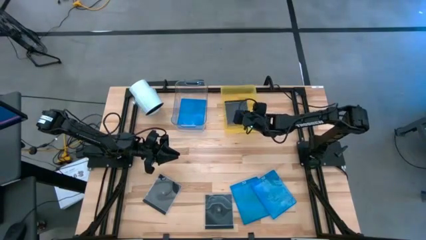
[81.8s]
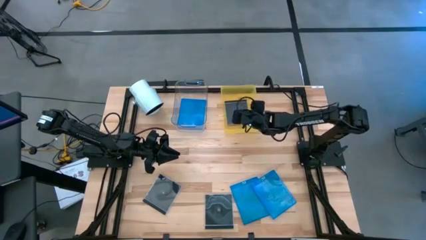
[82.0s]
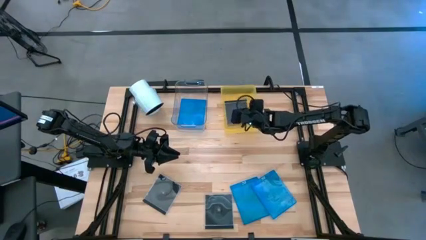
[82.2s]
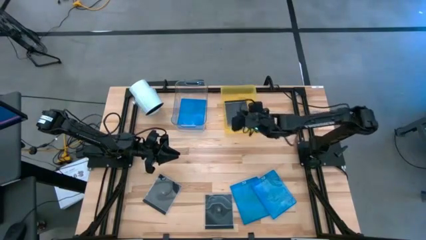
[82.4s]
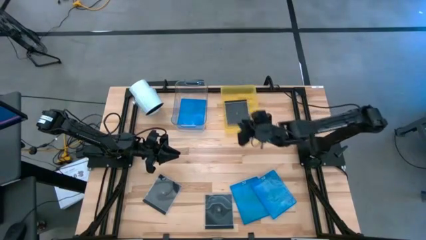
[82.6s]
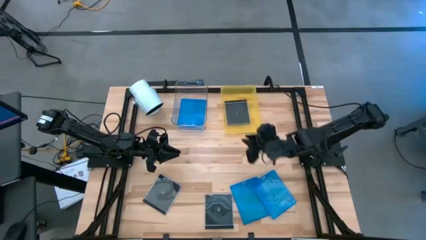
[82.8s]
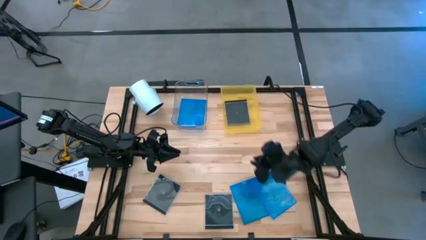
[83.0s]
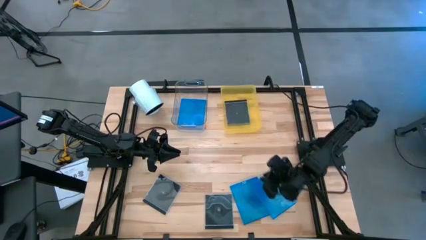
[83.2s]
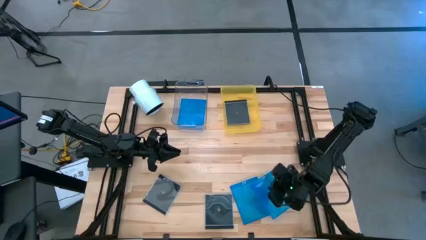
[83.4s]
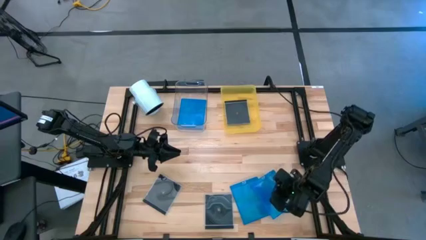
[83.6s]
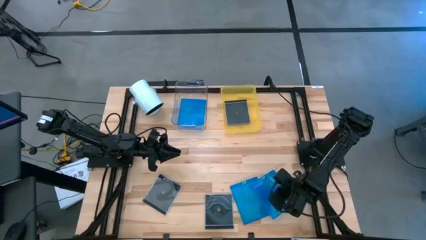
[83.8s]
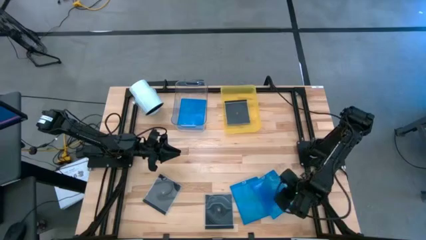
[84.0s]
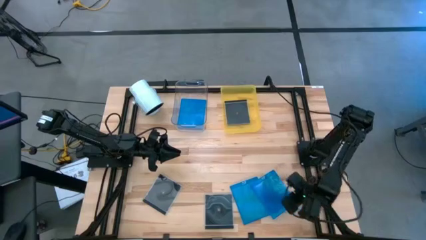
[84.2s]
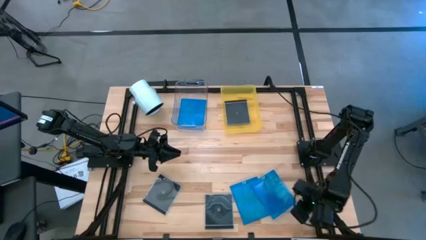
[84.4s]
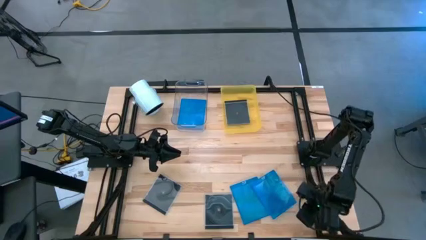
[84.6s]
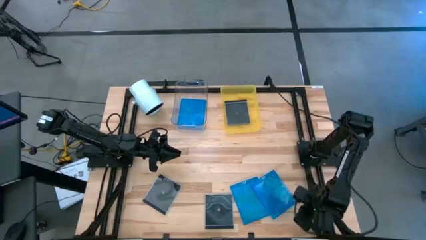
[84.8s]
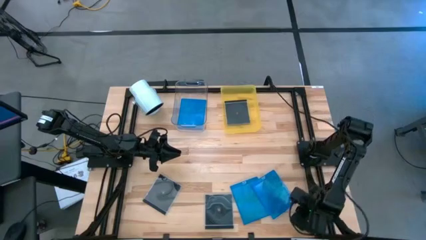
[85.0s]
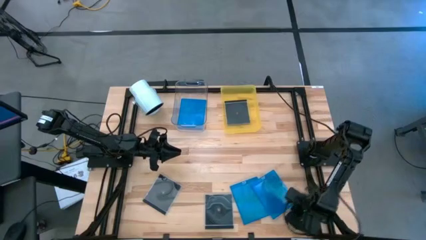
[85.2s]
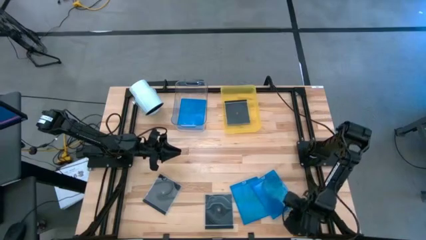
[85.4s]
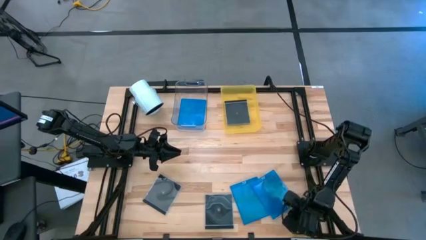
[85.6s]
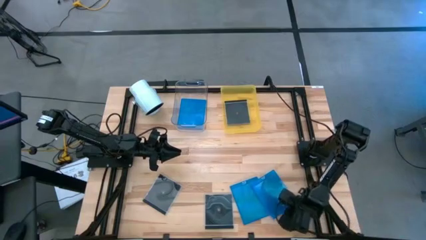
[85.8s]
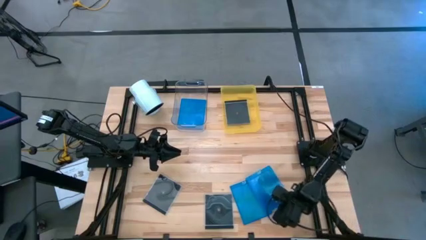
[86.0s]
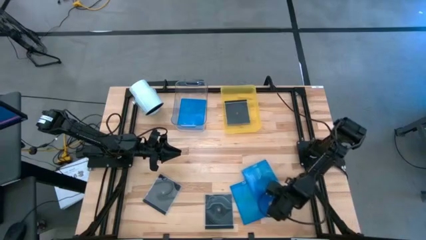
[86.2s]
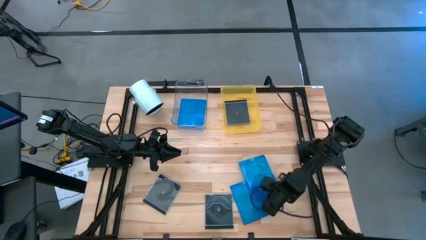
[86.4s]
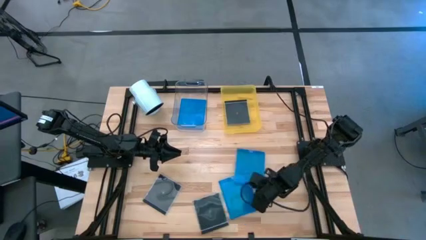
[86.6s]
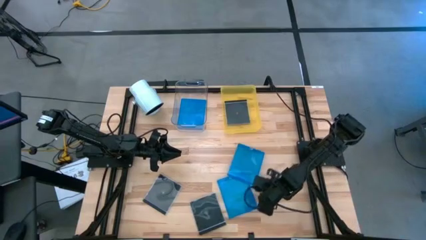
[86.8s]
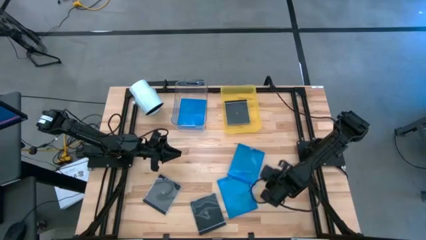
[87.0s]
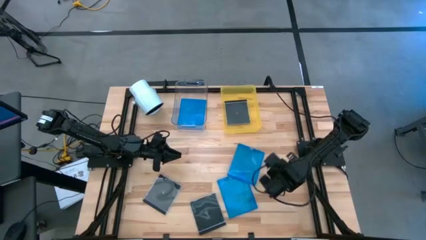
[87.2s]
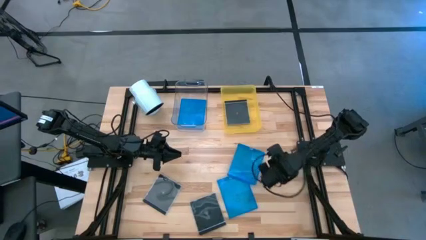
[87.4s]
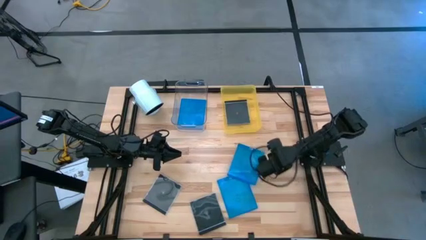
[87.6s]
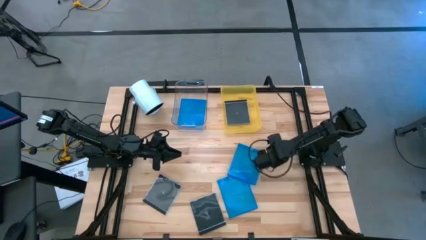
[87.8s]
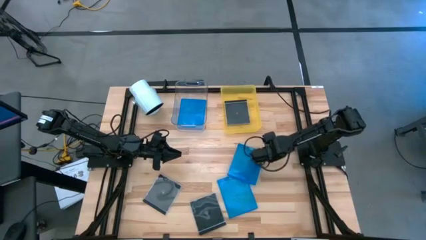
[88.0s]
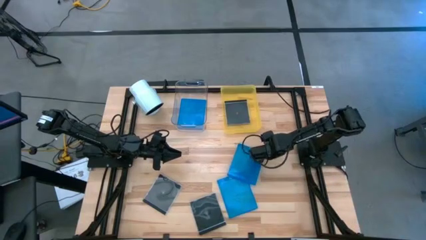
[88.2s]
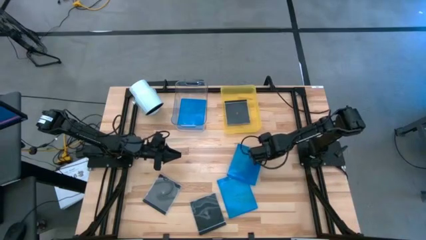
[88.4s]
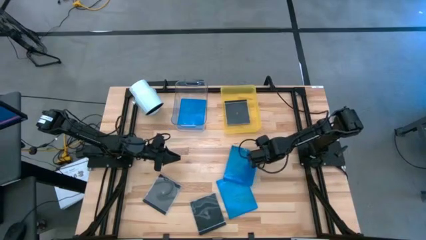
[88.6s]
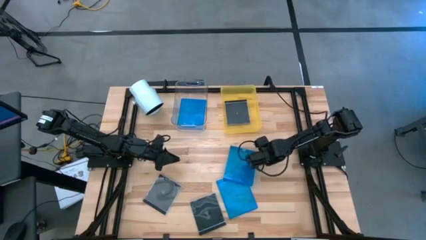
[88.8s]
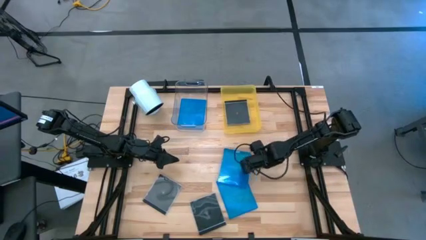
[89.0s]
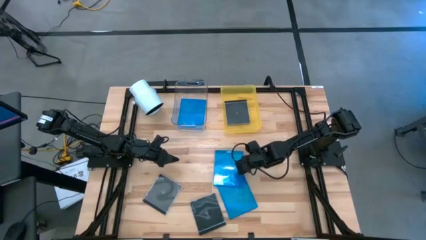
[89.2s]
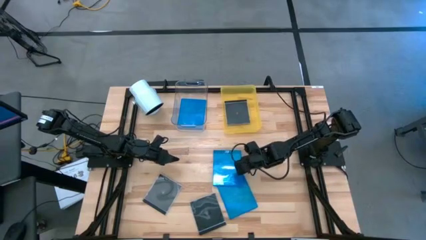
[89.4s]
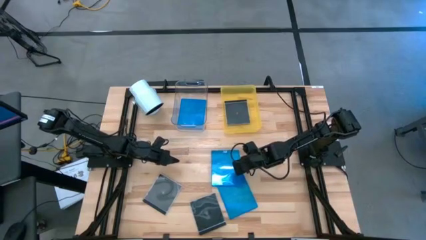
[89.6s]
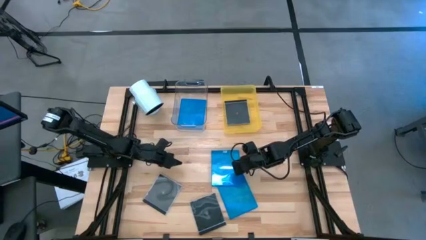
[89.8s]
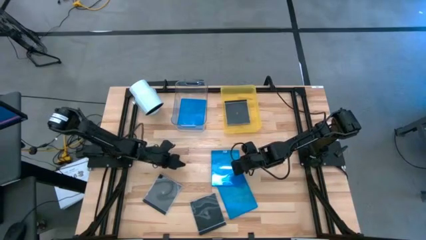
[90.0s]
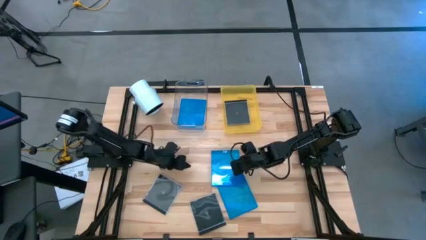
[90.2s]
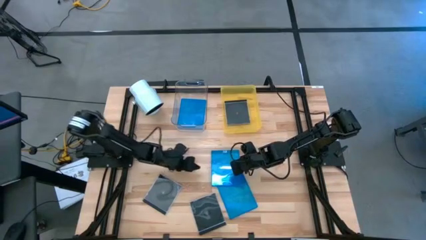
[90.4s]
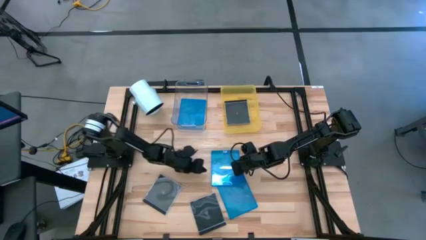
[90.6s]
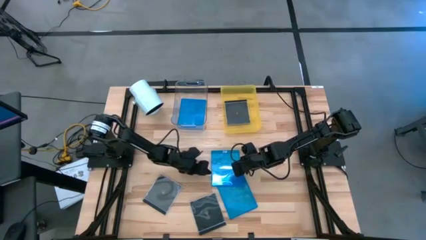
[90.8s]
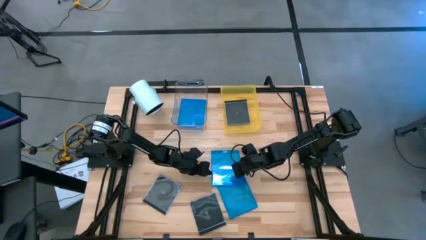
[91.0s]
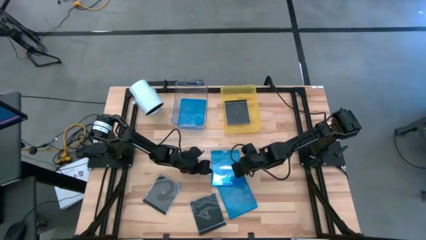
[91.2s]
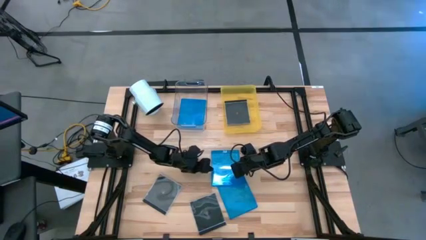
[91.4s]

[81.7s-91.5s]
Task: Pick & place jewel cases by type
Put the right blue CD case into the transparent bin

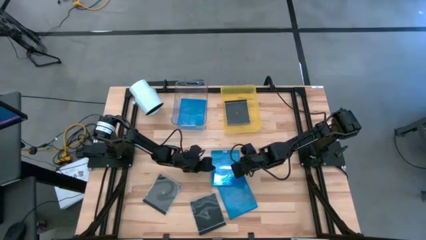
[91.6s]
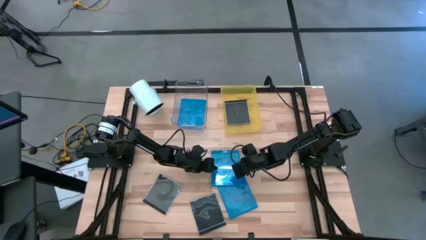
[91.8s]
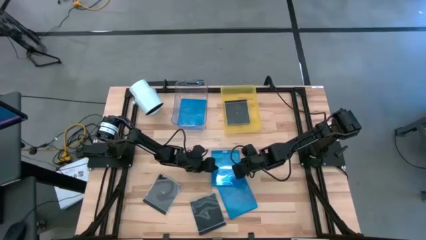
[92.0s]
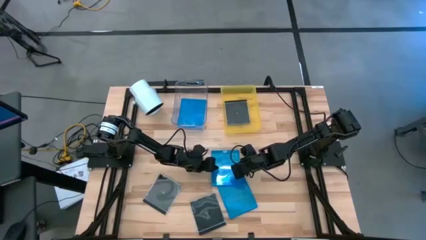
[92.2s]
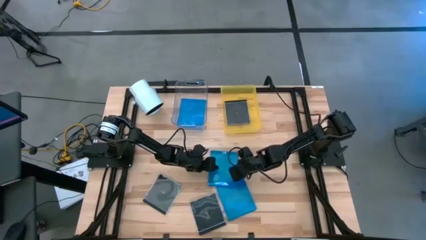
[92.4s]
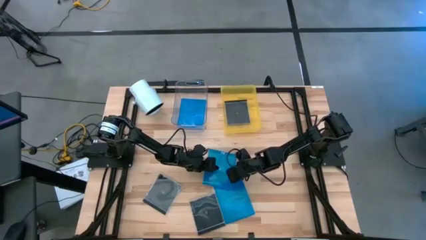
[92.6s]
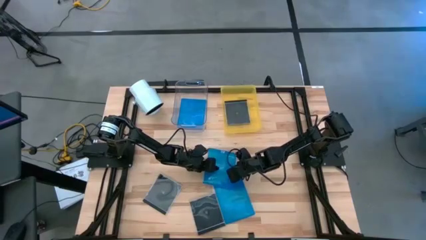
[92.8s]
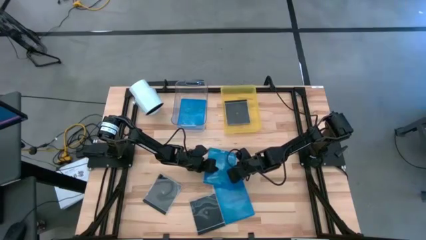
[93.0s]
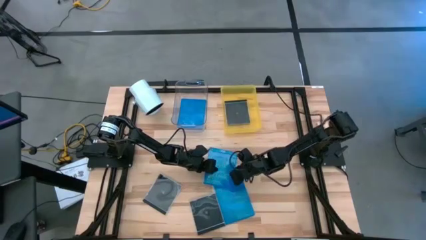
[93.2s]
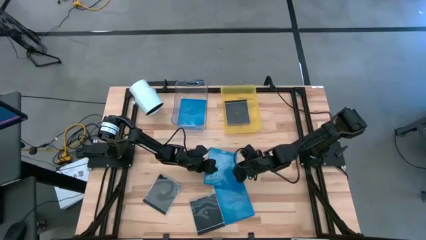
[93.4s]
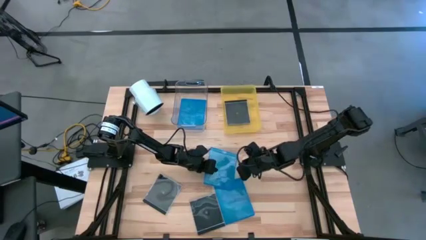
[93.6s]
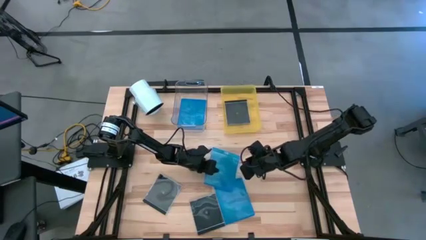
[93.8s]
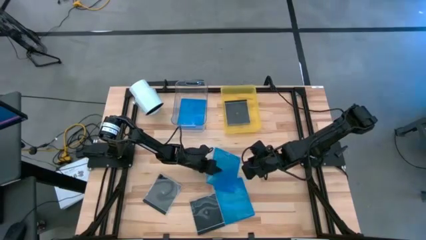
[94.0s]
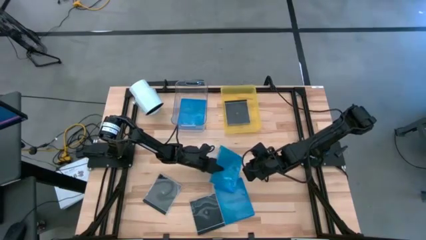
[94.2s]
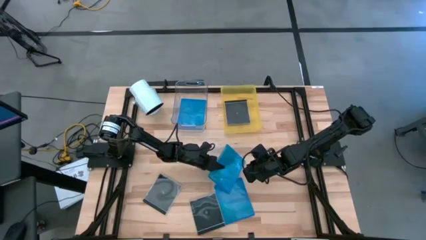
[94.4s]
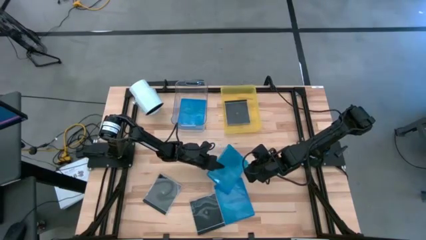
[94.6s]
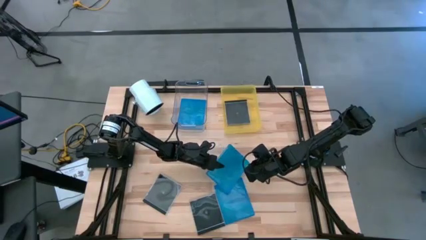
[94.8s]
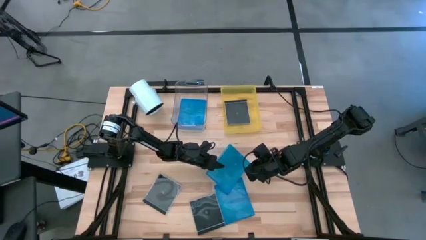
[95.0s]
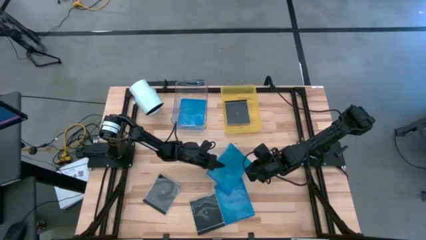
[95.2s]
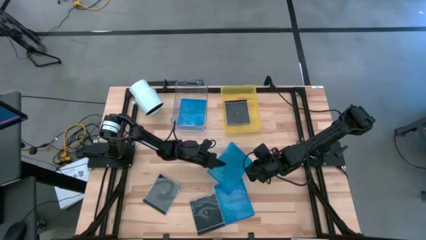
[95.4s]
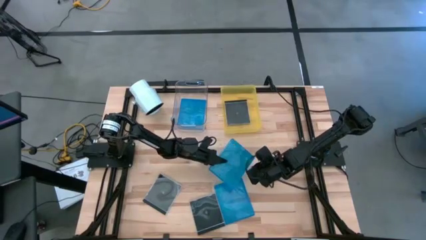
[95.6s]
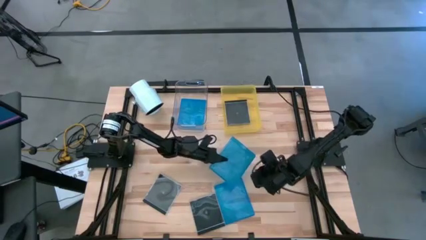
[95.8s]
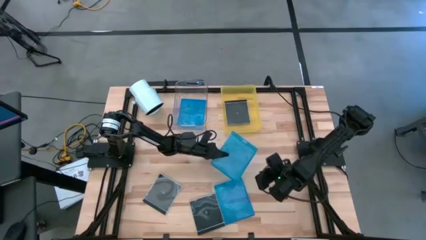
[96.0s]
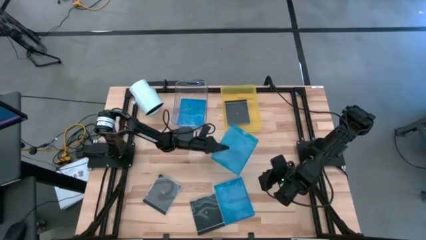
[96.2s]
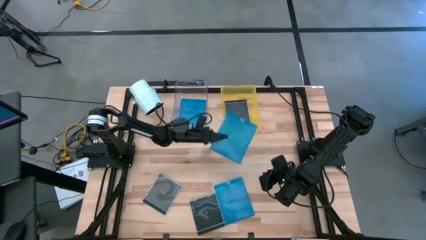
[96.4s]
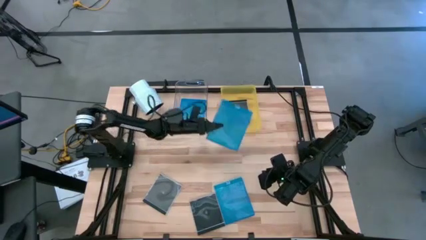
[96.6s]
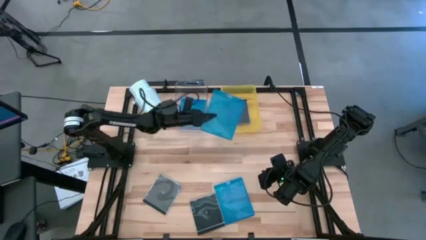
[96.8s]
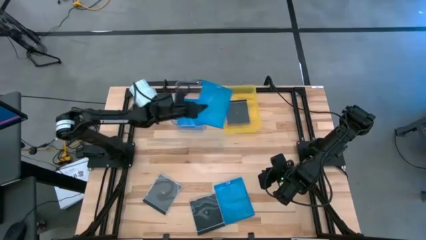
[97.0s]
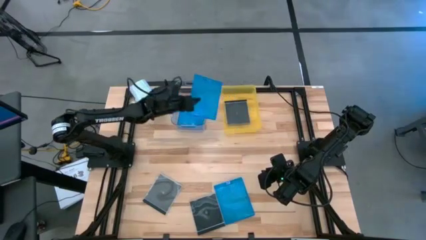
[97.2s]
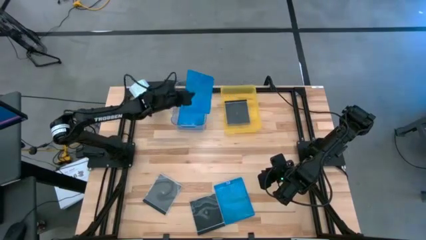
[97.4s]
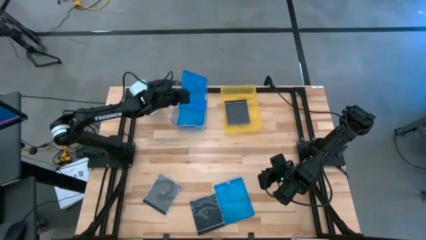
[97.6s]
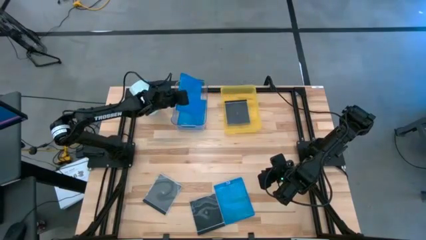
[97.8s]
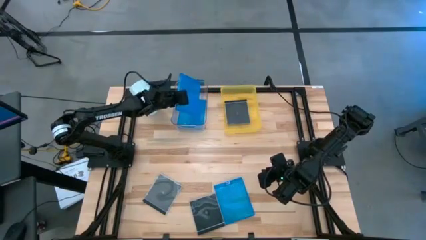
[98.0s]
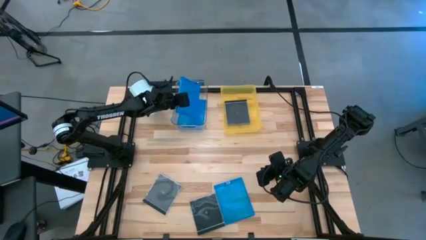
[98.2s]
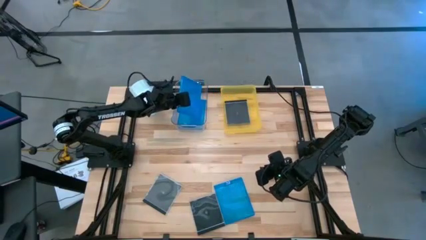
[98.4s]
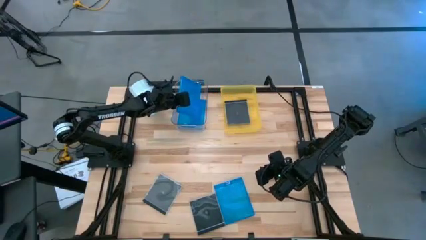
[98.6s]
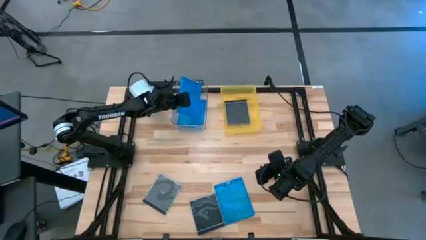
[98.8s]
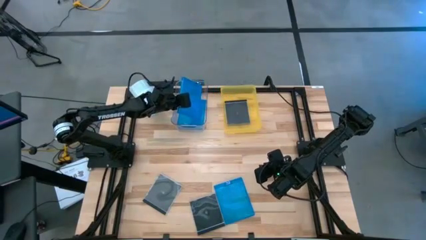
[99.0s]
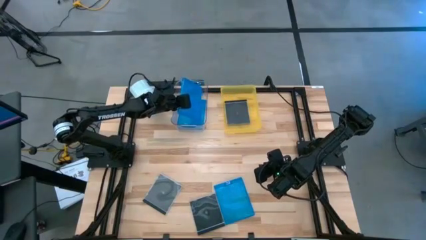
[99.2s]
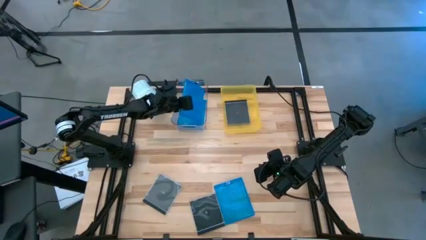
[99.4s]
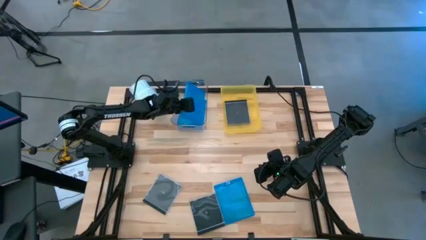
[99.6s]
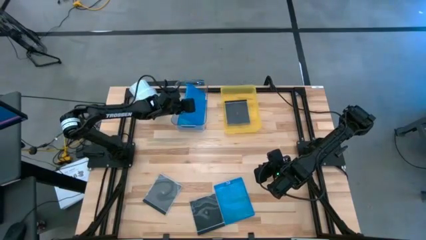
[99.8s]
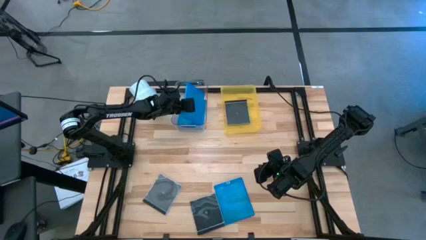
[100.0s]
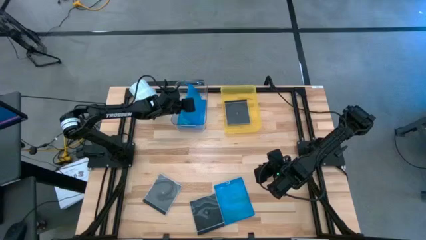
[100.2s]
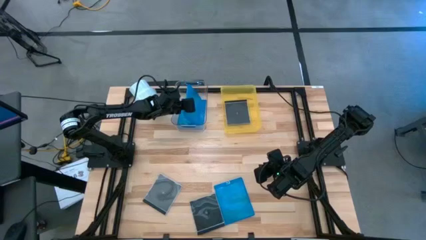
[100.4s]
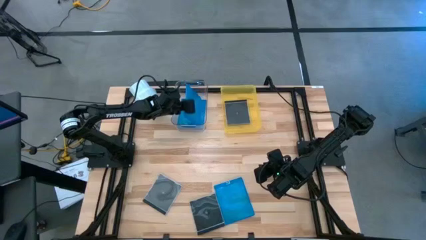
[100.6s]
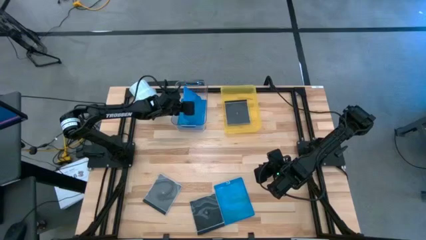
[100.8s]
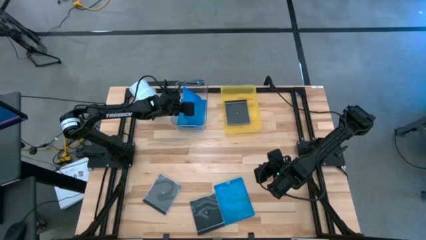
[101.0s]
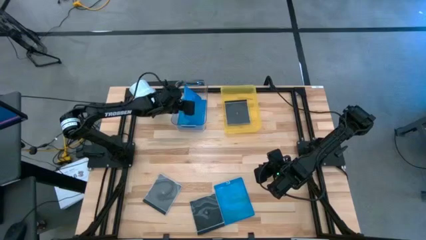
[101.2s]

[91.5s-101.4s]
Put the right blue CD case into the transparent bin
